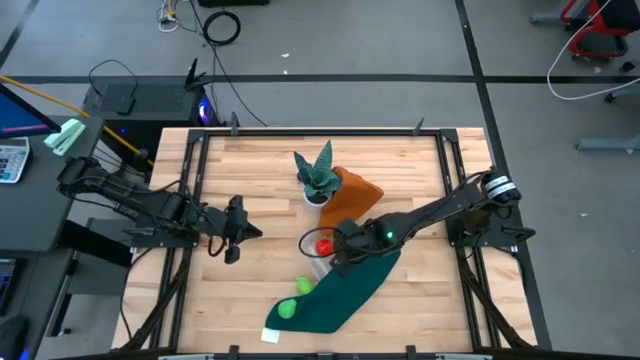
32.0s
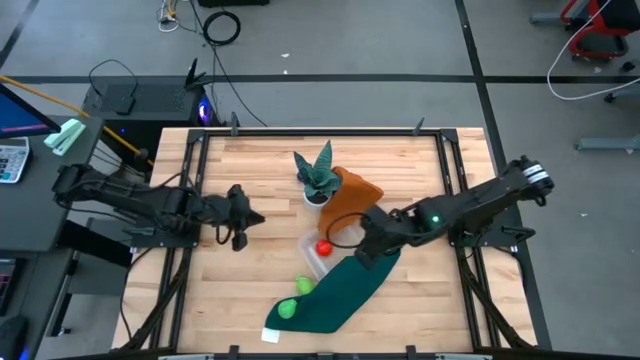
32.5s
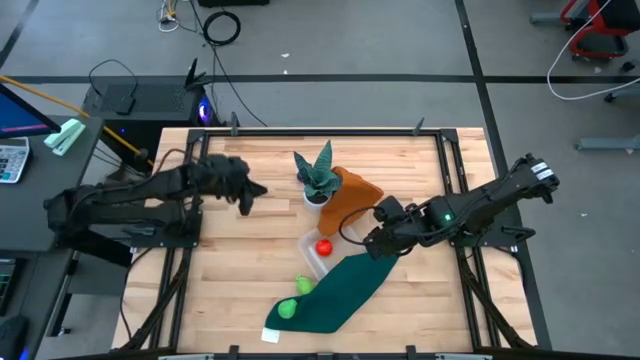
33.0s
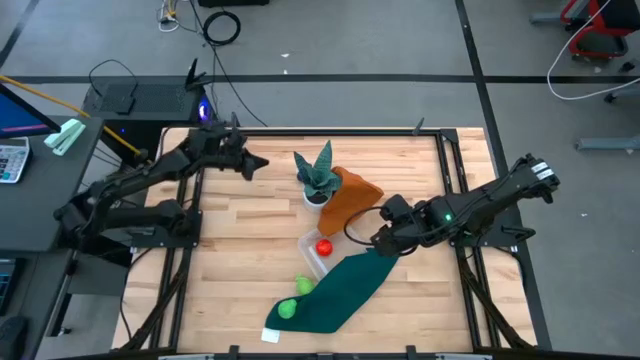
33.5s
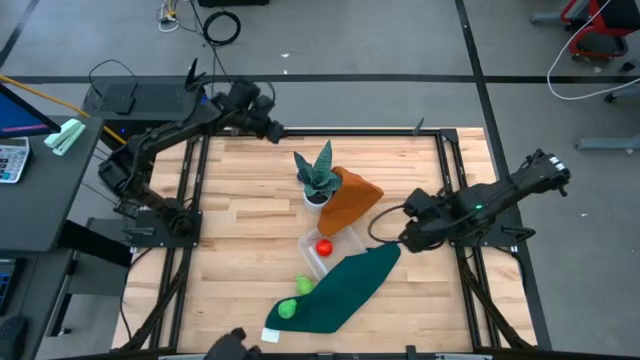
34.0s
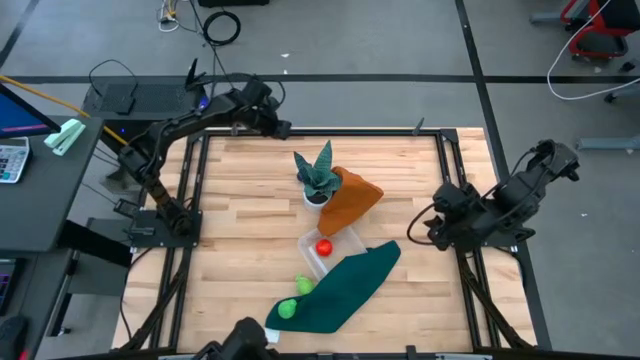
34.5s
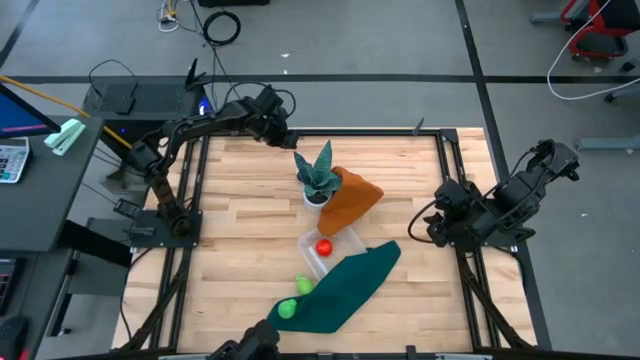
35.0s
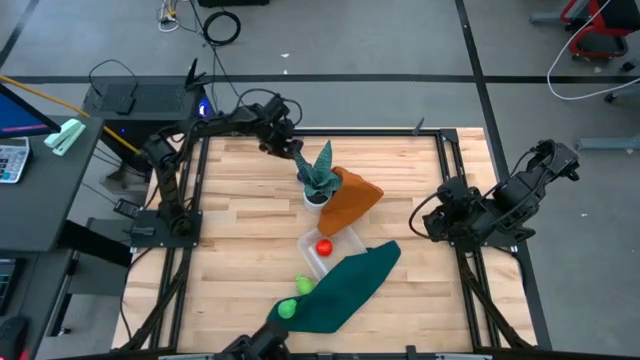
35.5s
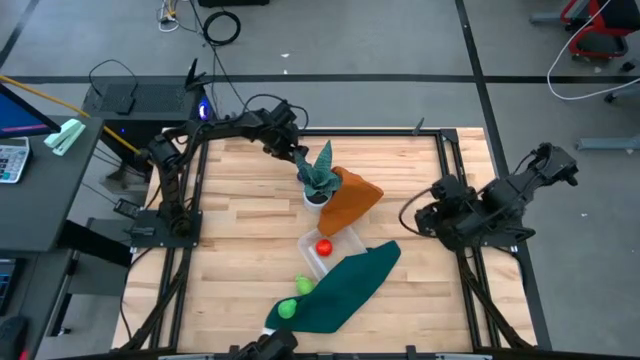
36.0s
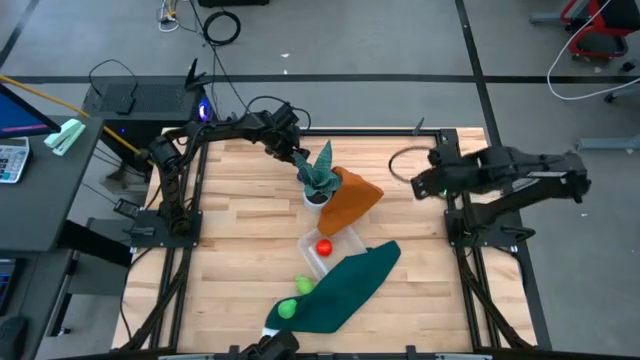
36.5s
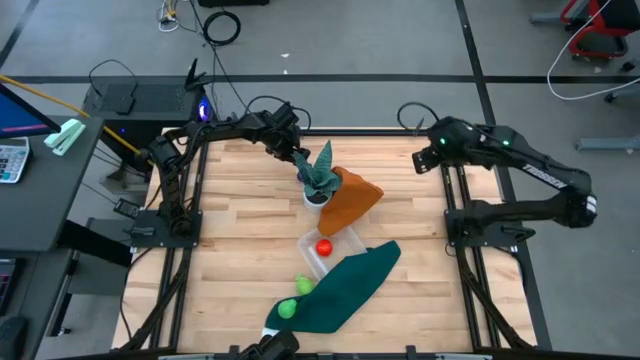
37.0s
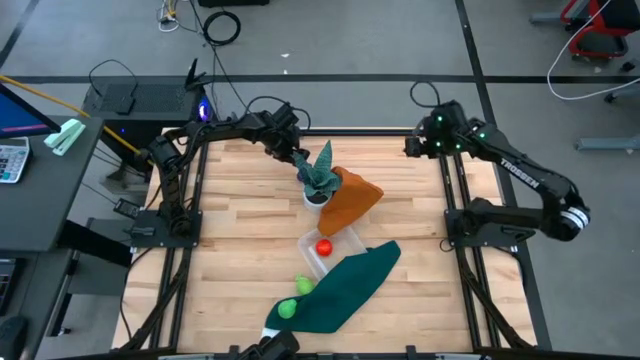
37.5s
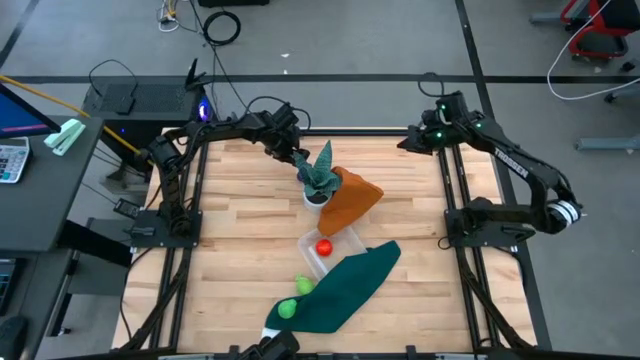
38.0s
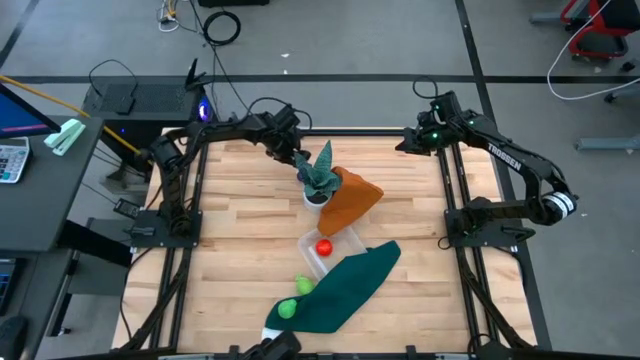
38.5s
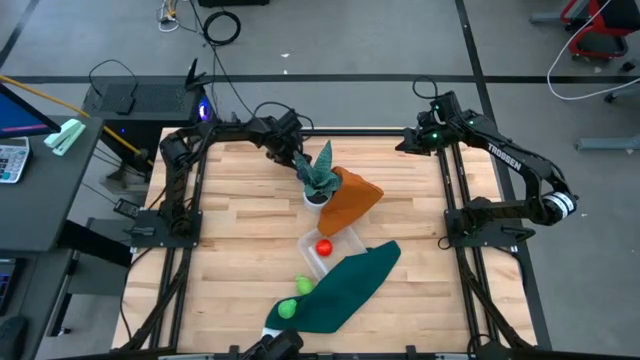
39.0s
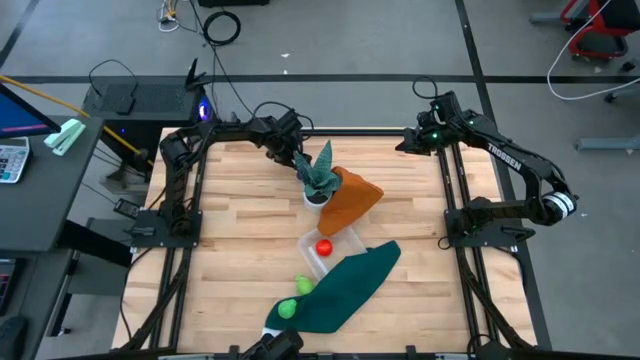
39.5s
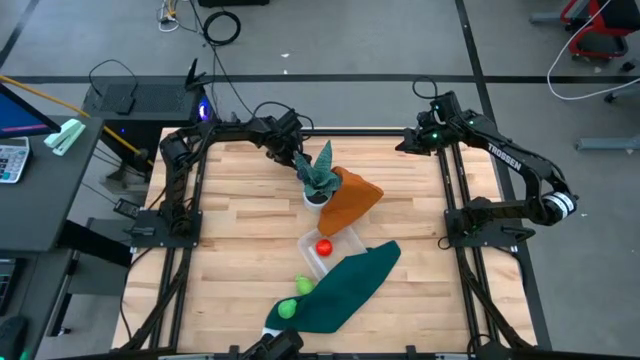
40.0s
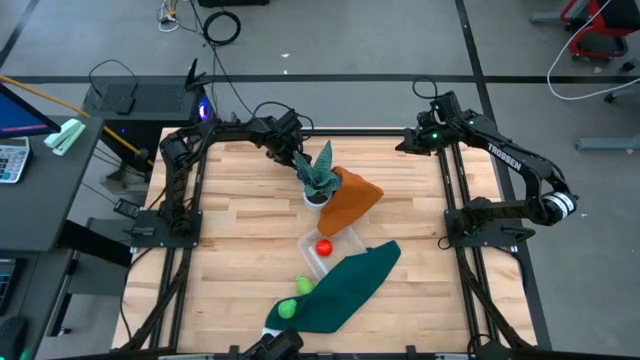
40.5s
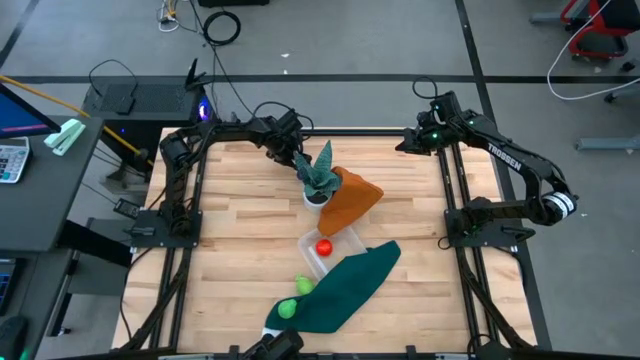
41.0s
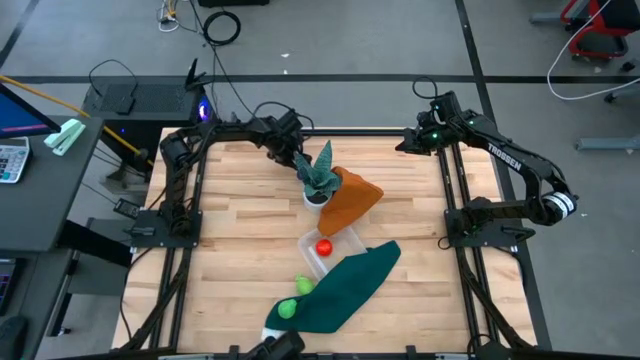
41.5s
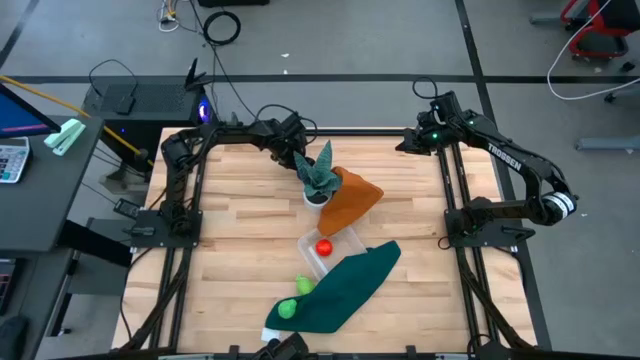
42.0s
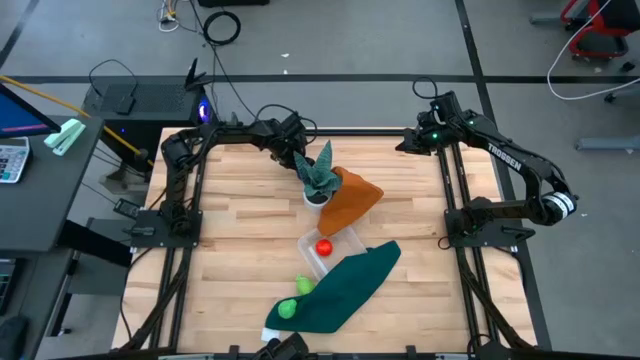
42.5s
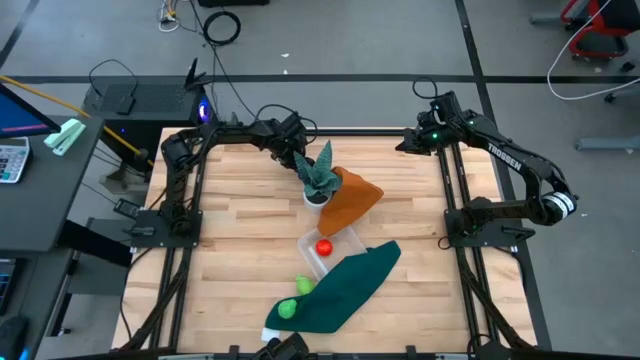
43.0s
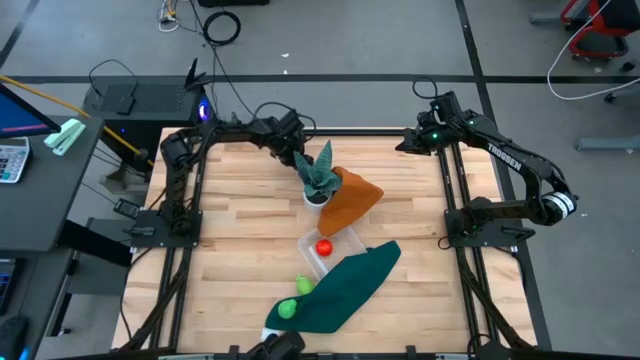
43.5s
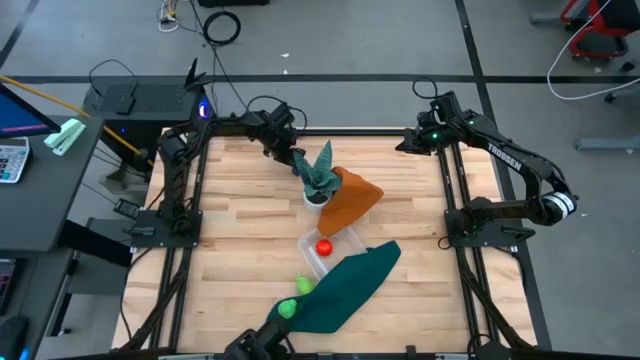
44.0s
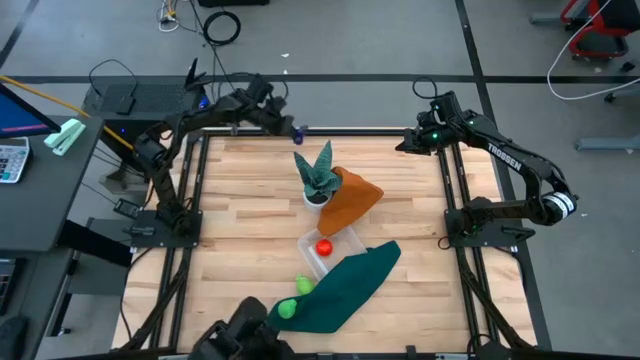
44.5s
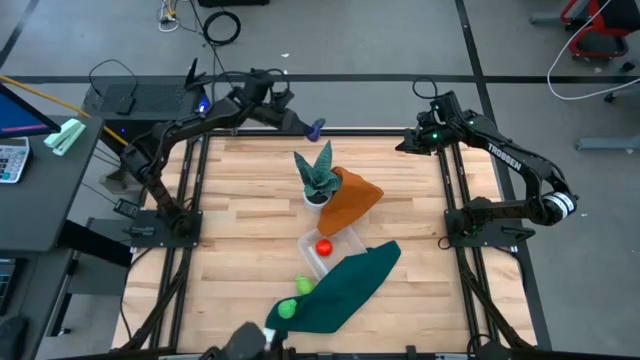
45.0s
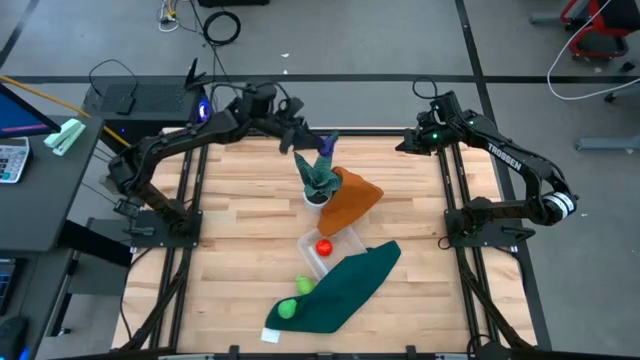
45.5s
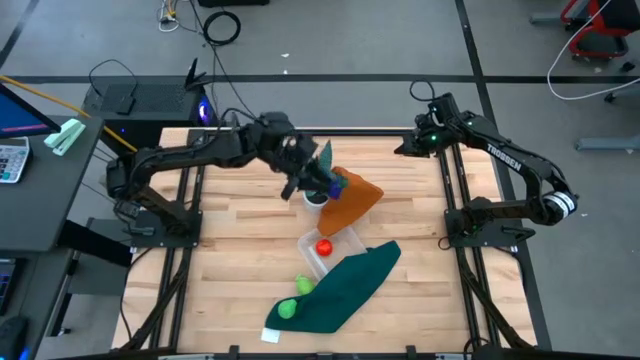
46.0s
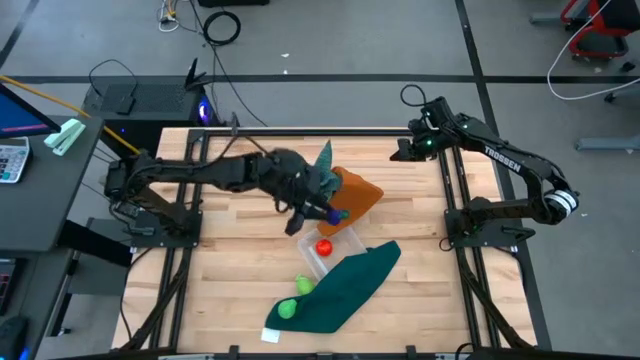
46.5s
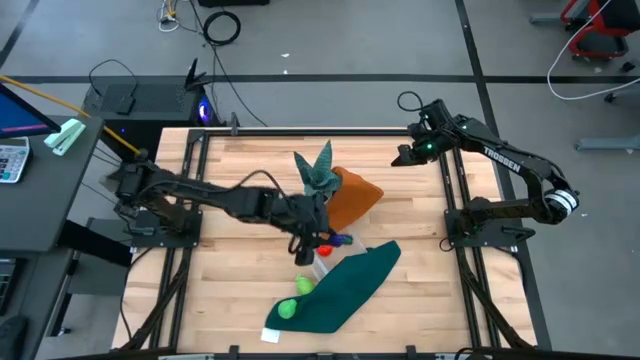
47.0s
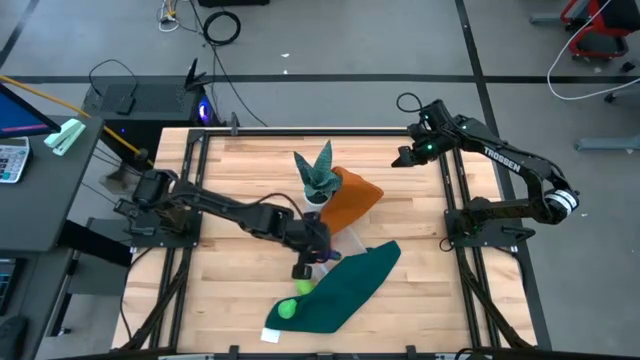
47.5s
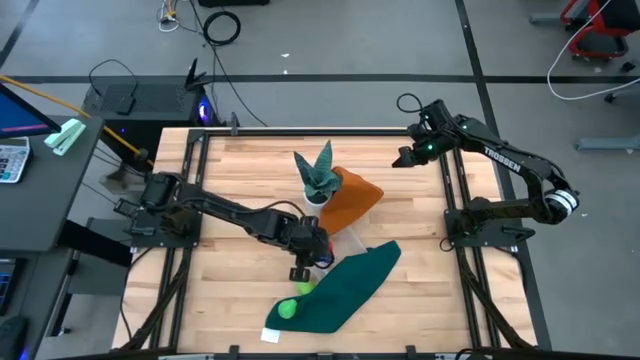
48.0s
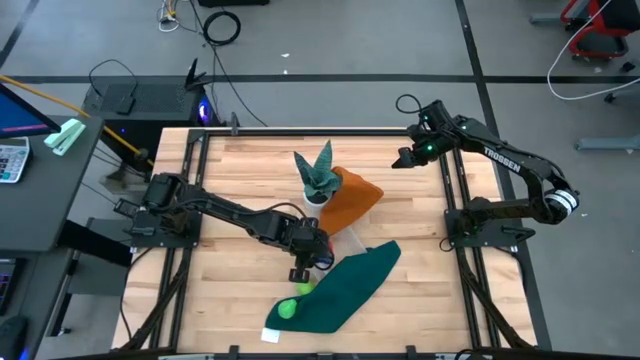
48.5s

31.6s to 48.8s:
Task: Pick and placing Produce into tupperware
Put the violet eggplant into the transparent bin

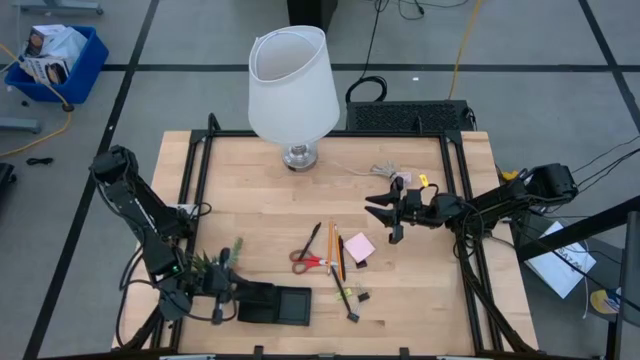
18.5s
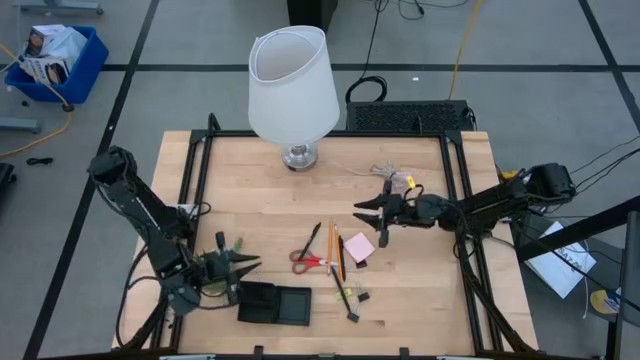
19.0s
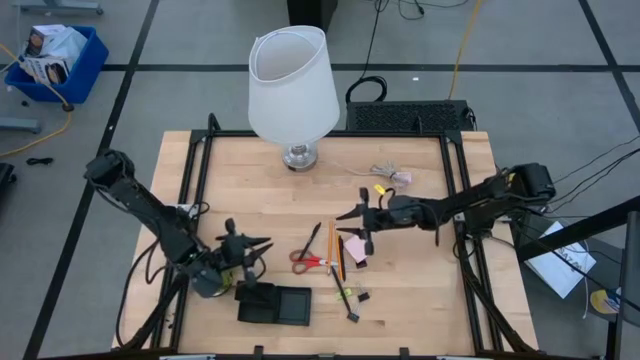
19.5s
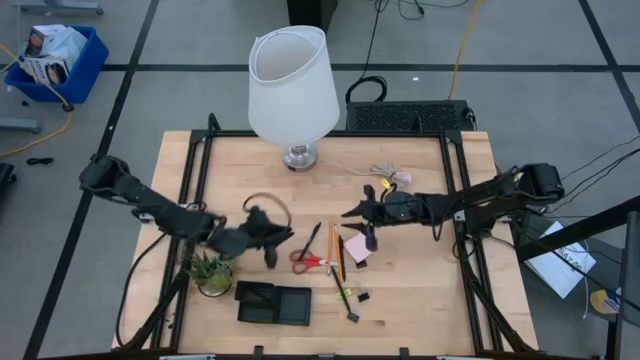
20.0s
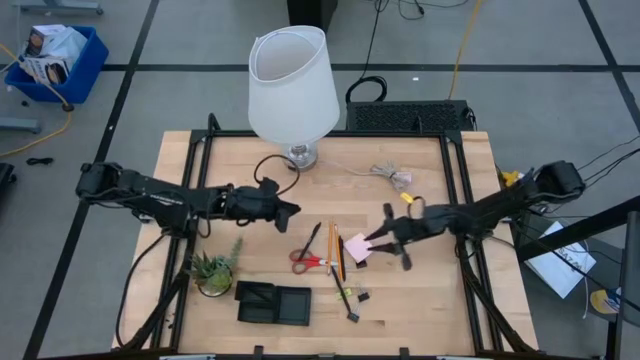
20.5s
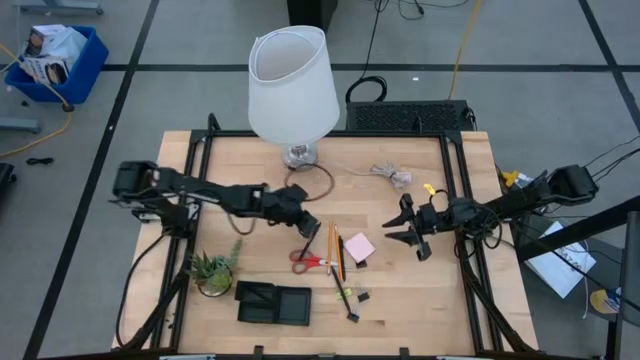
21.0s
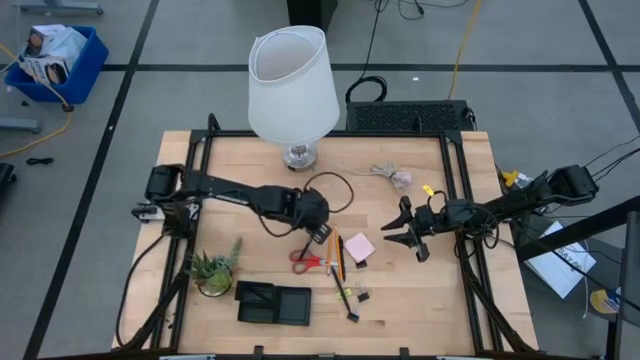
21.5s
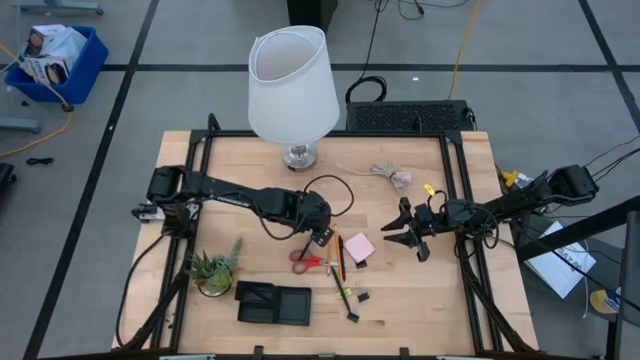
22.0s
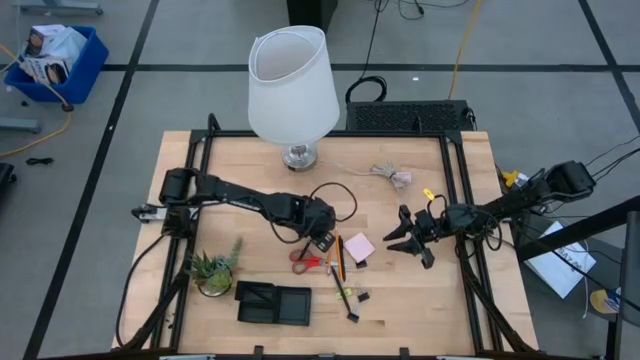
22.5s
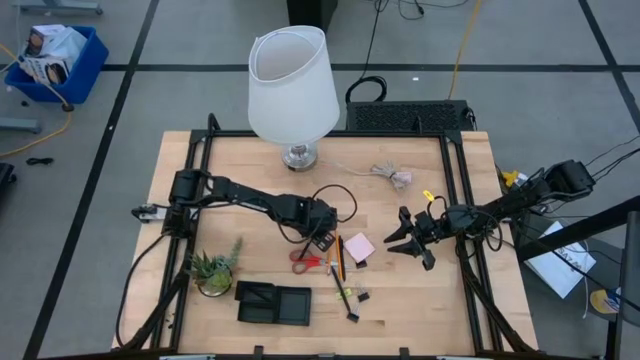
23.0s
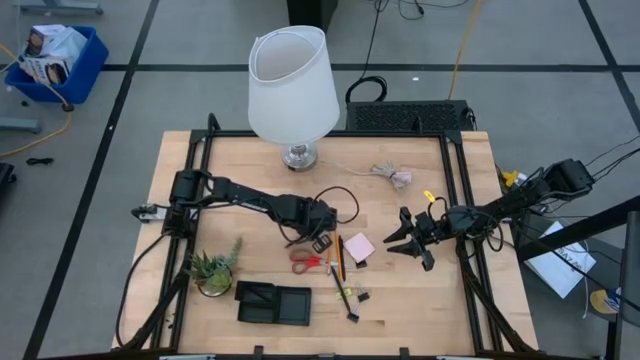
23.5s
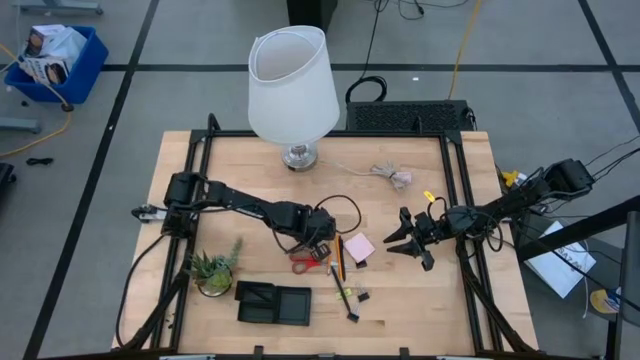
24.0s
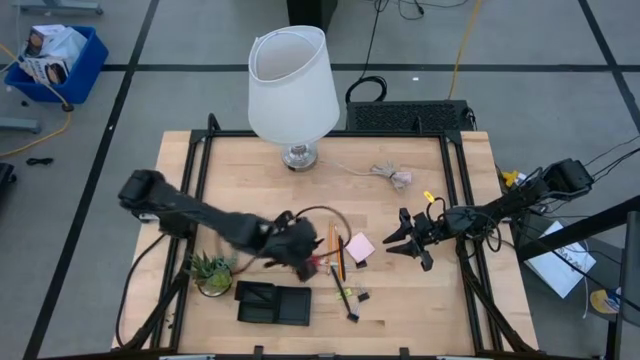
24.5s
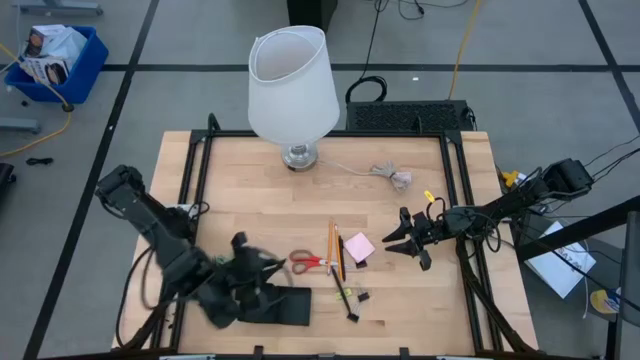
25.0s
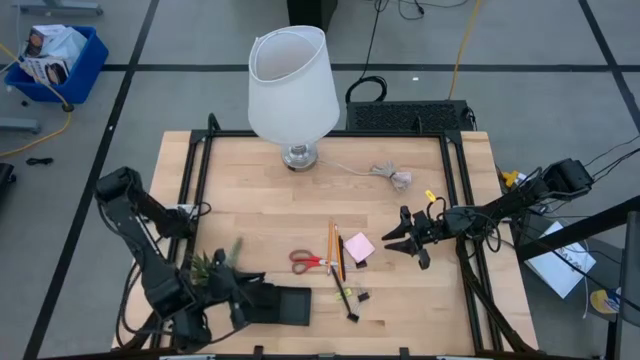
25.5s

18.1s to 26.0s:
Task: Pick and place office supplies into organizer
Put the black pen into the pen organizer
